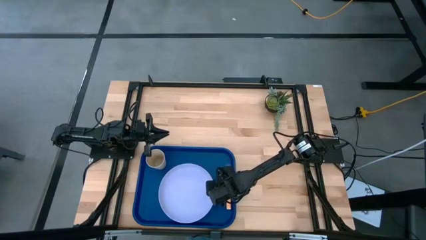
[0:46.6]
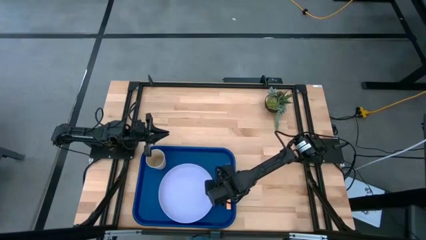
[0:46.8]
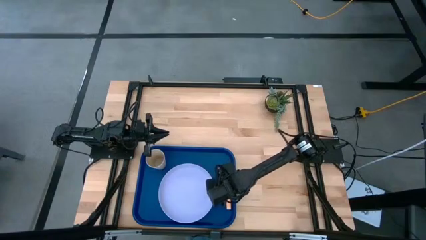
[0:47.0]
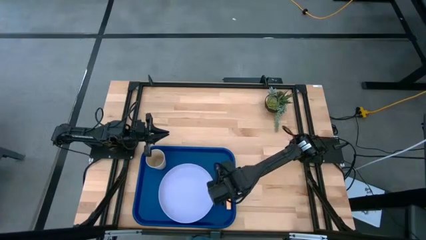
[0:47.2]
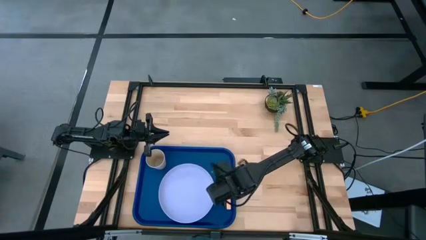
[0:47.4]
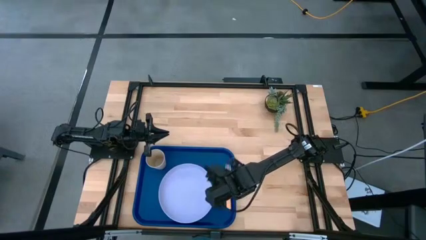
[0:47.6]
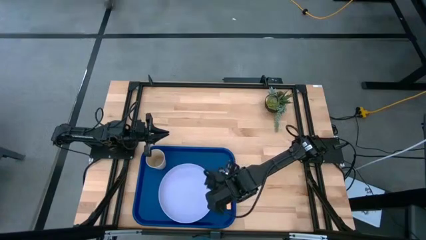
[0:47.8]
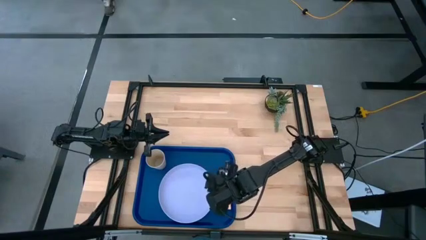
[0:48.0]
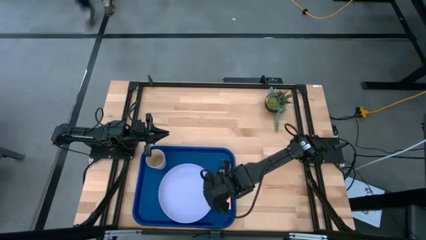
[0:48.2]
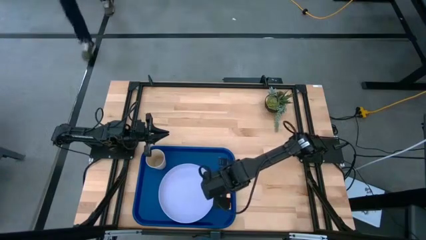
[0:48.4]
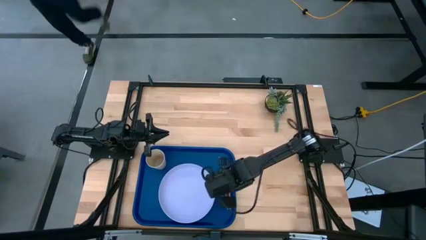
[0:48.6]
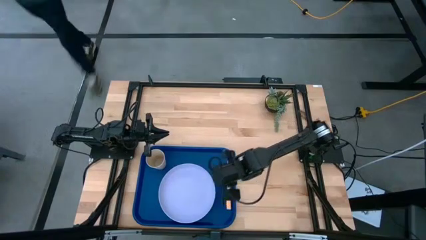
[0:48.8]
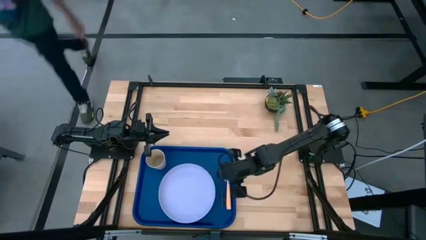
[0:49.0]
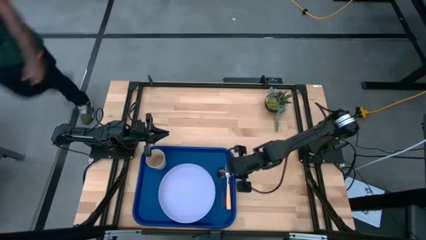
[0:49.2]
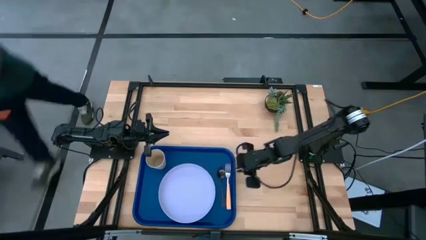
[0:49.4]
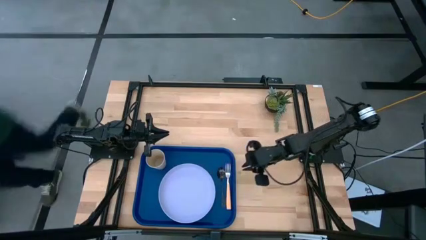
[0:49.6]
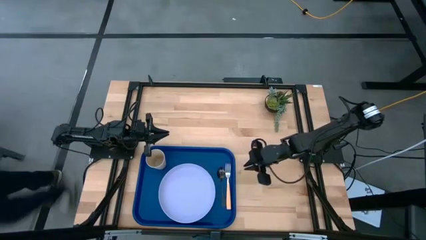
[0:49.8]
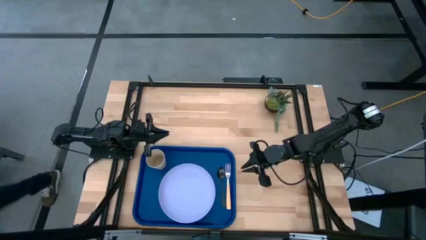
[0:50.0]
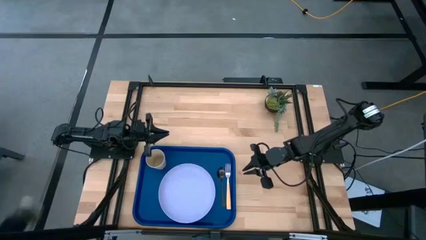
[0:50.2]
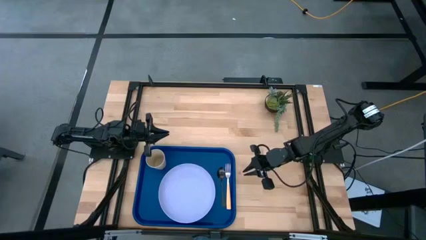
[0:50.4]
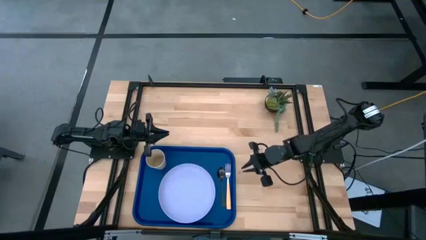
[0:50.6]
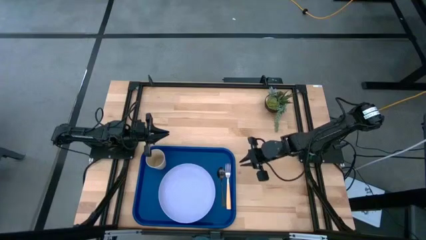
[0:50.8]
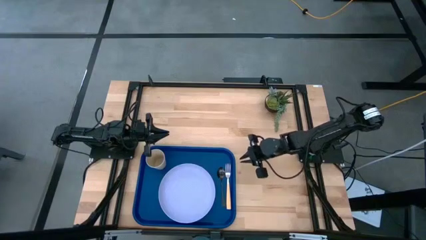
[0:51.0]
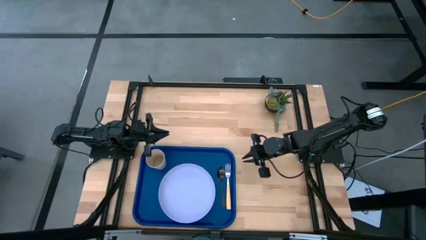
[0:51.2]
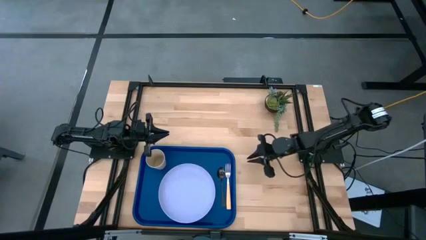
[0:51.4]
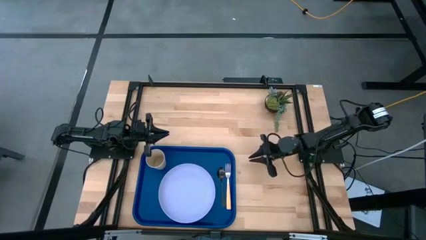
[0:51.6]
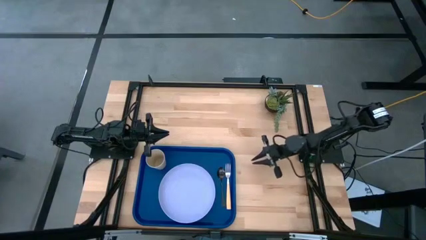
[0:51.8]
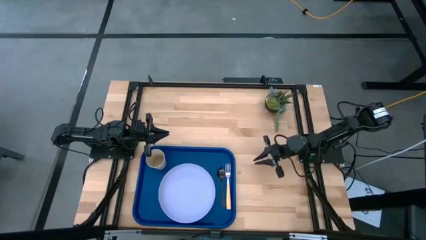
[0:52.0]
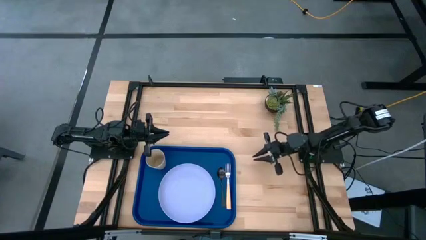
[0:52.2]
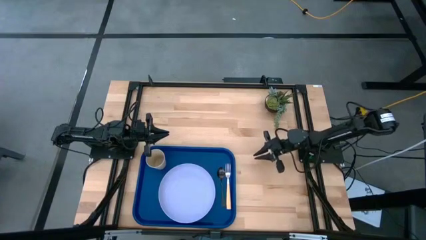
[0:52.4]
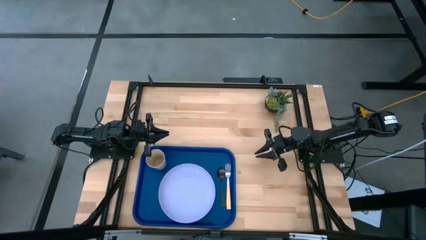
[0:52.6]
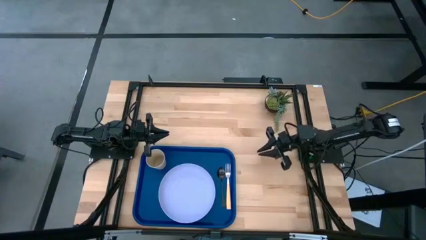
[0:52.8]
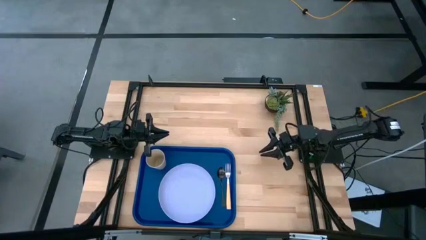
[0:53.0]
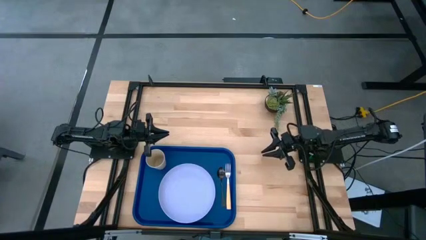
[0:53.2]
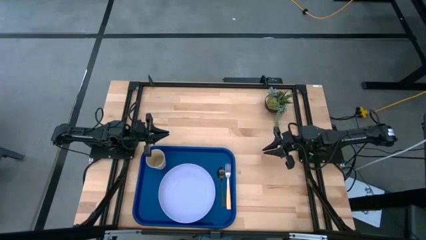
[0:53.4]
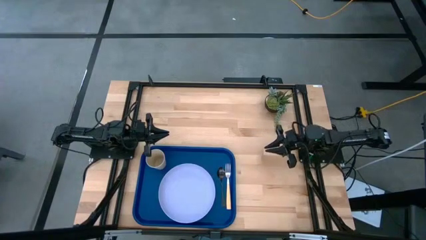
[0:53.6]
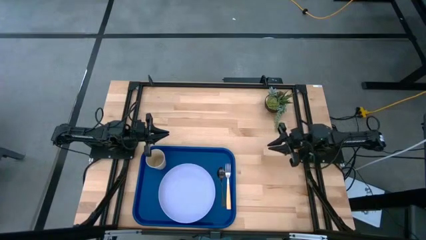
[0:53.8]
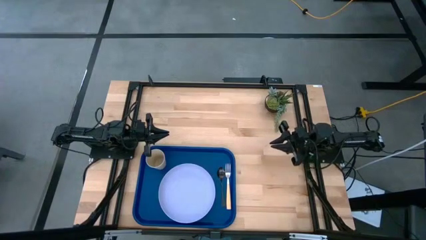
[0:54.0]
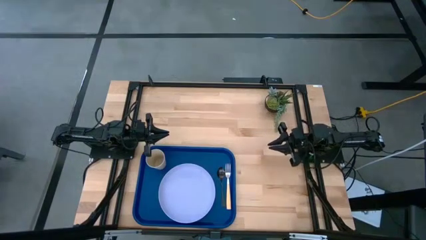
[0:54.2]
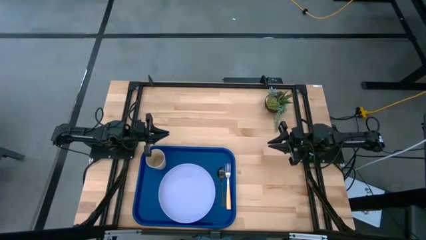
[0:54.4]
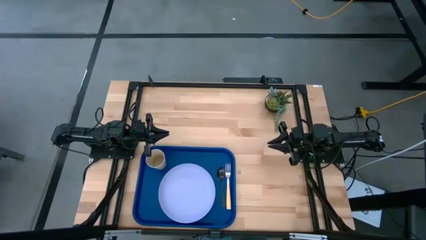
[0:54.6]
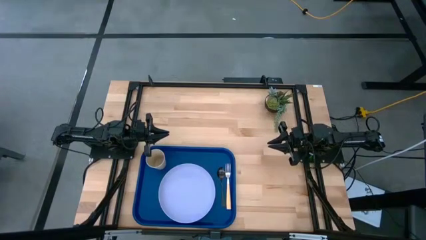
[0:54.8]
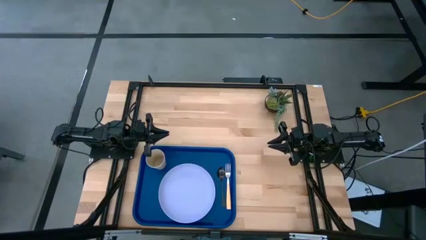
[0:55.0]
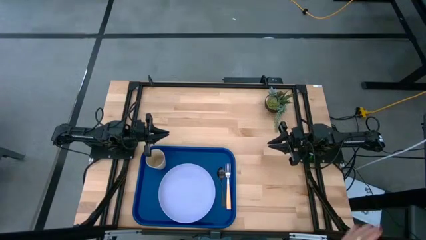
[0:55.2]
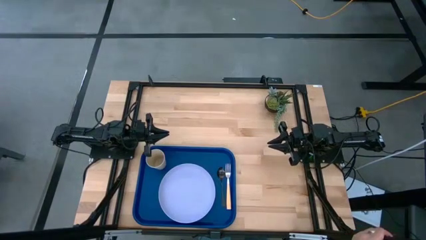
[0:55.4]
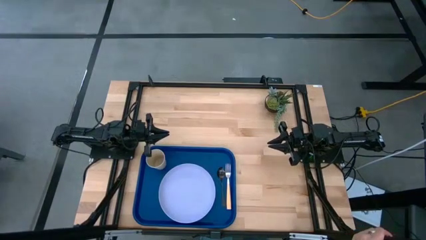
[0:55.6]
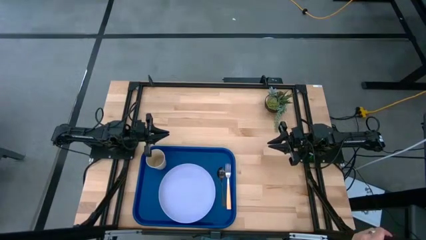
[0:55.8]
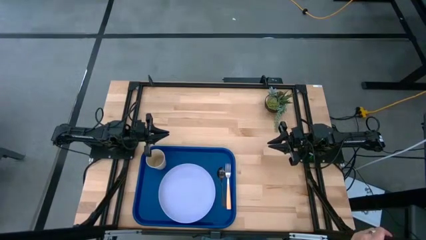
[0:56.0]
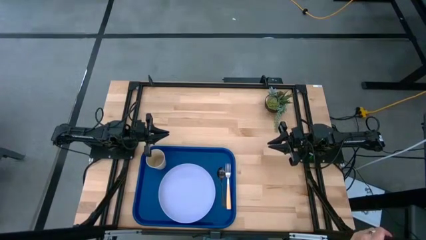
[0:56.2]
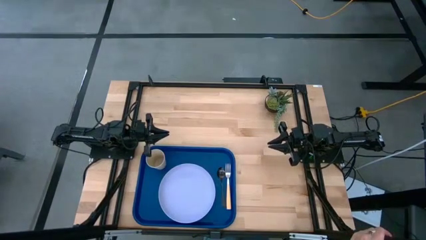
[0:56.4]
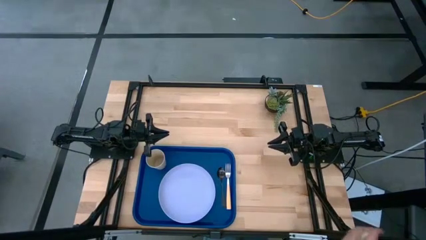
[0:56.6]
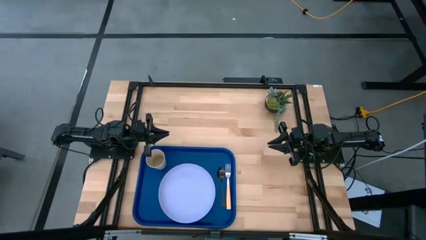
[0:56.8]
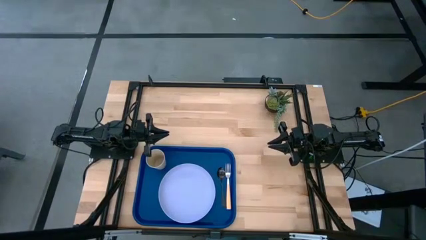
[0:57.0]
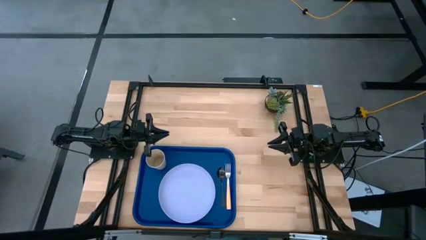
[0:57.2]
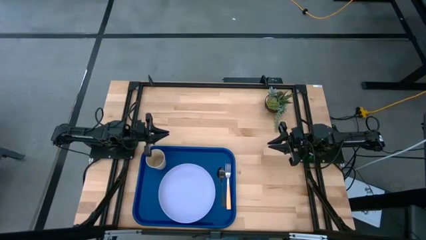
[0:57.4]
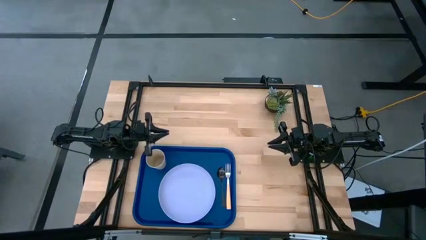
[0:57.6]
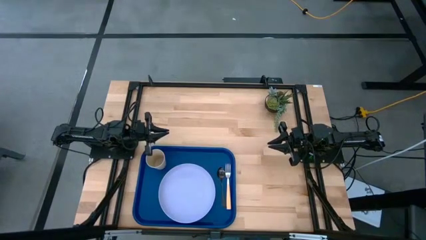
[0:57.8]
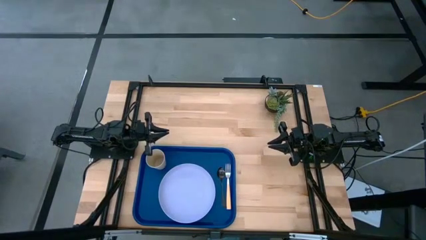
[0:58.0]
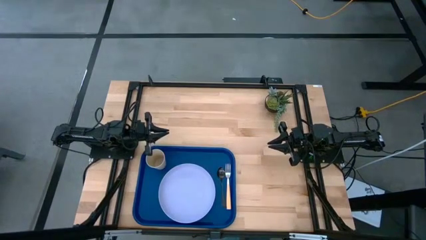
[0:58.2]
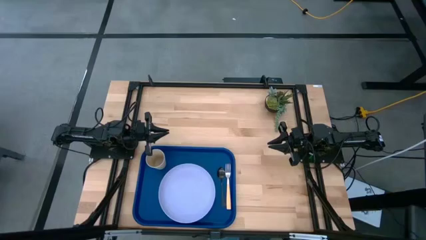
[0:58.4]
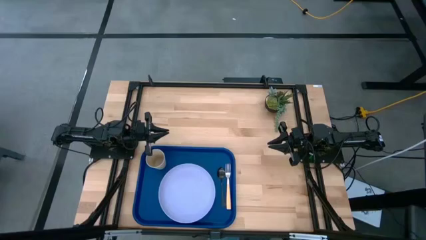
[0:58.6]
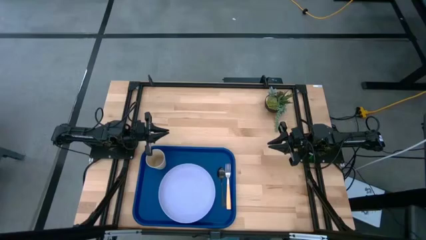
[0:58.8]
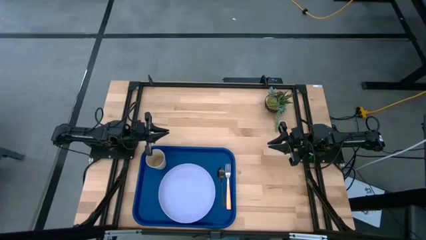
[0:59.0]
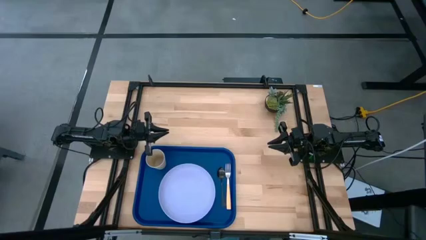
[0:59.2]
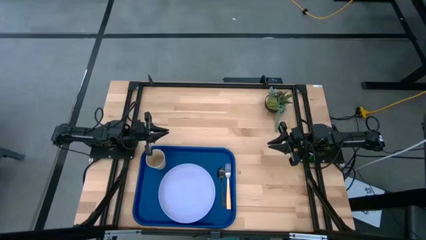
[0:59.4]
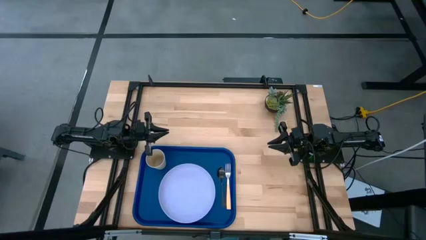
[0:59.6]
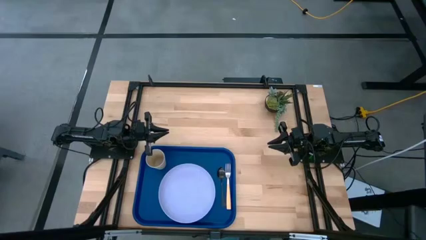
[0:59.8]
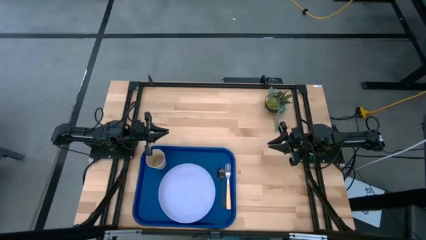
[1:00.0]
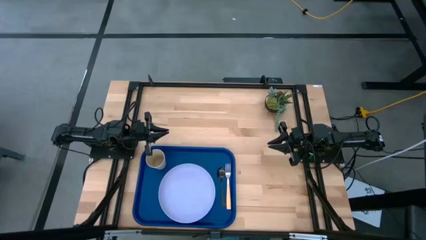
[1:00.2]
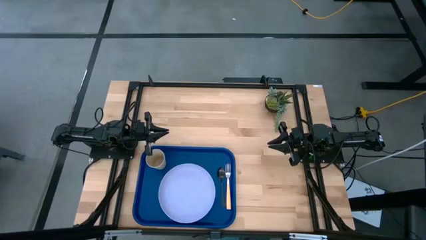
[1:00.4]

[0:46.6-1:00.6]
Task: Pick and place plate/cup/fork/spoon on tray
Return to Home Position

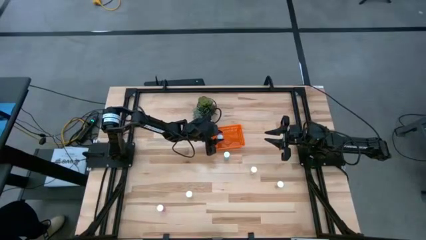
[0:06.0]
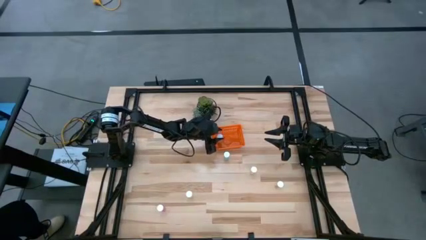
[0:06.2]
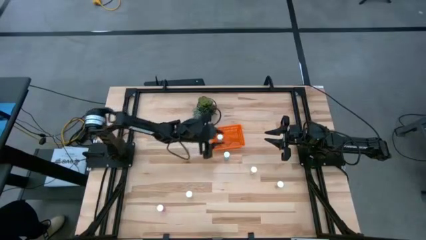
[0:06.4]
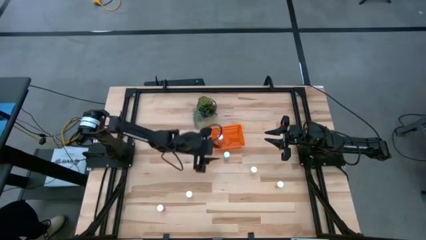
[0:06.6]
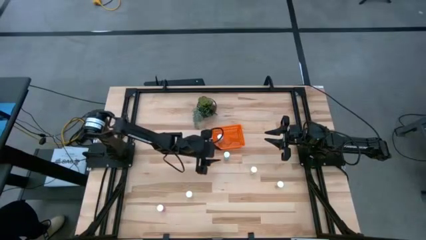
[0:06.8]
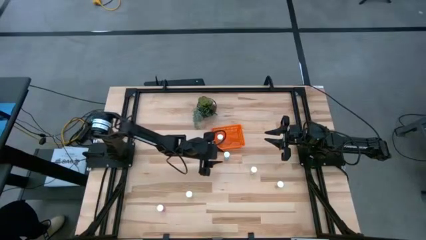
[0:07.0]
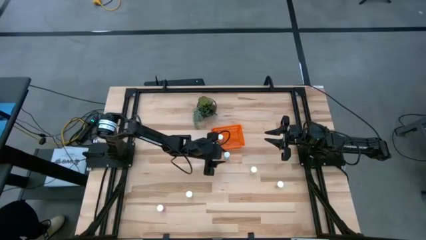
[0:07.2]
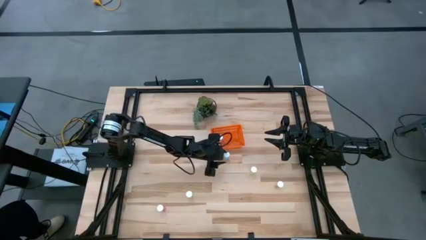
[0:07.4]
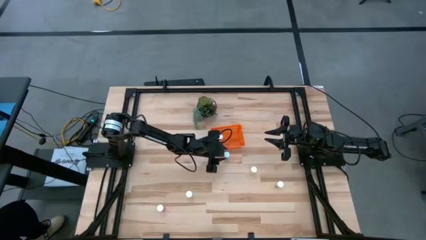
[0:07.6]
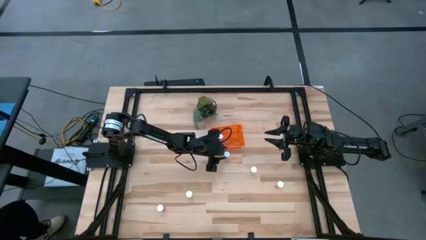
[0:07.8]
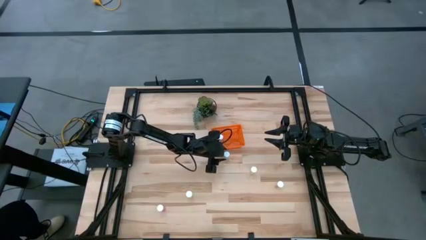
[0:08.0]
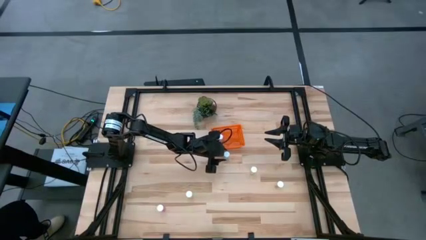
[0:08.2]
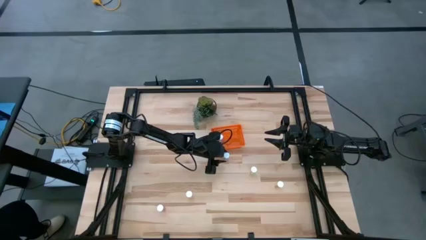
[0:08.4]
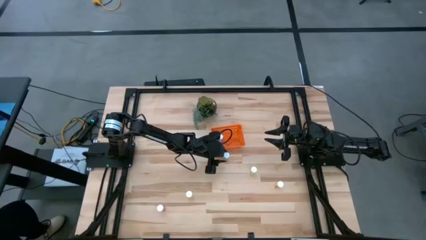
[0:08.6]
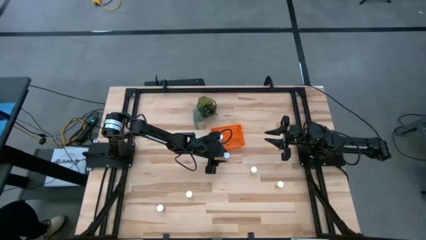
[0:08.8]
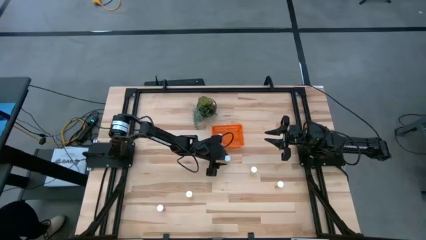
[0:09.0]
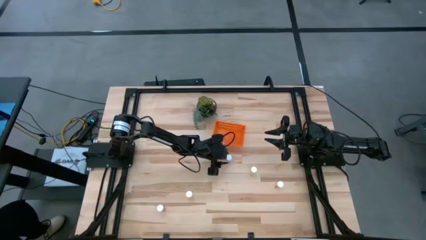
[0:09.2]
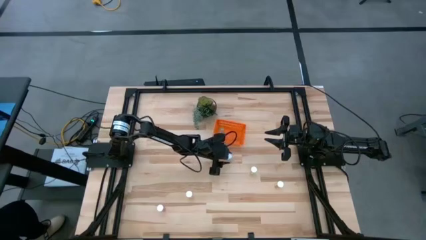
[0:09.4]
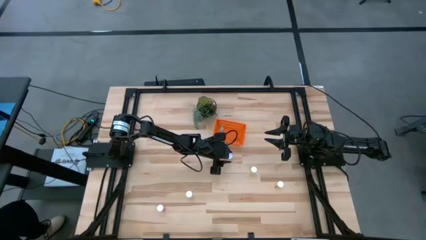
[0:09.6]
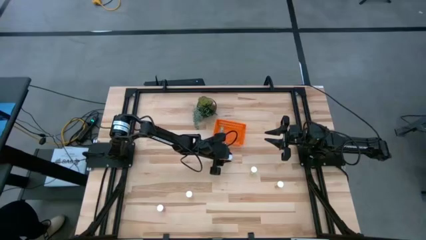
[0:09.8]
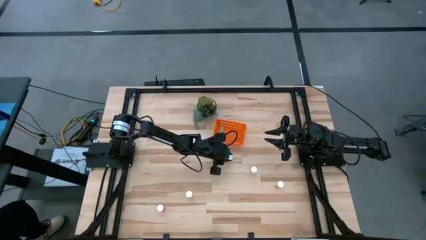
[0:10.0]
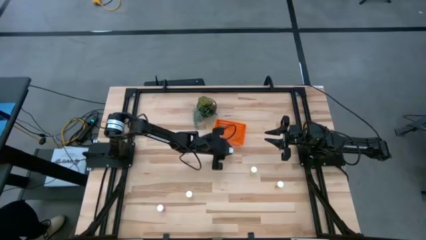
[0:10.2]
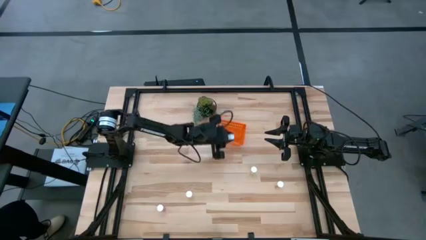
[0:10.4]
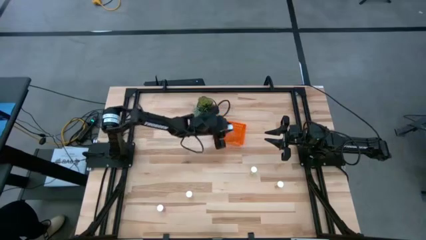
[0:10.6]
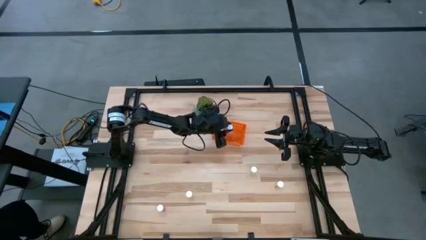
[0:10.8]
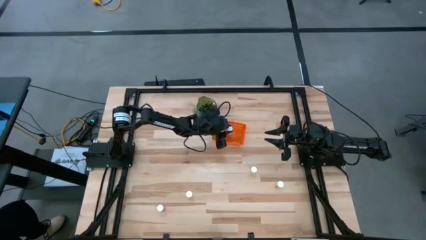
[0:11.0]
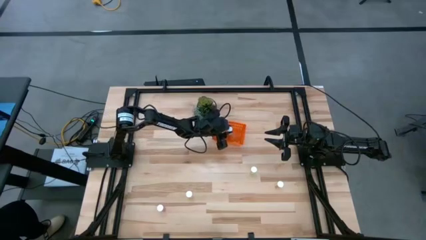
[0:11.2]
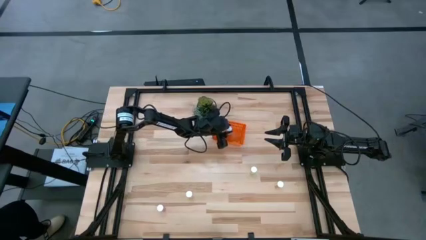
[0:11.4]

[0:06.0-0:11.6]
Task: Pick and place pill bottles into a basket
Put the blue pill bottle into the orange basket
